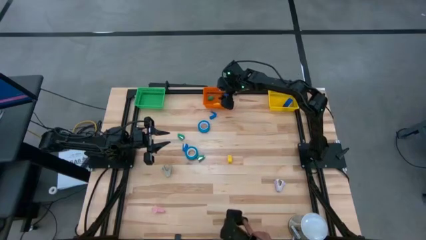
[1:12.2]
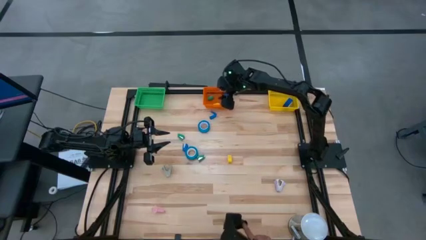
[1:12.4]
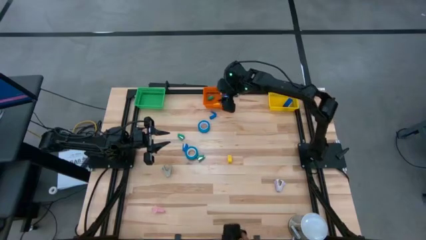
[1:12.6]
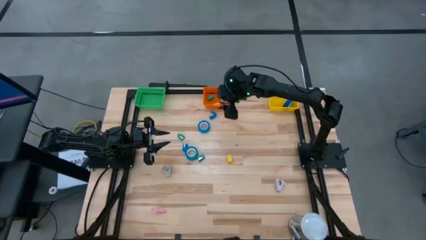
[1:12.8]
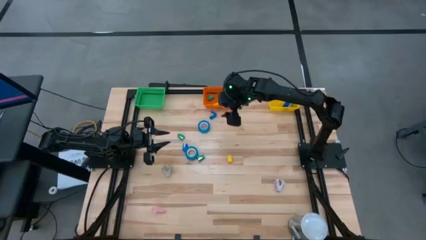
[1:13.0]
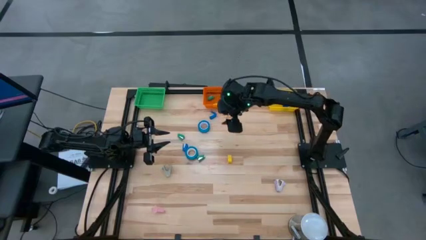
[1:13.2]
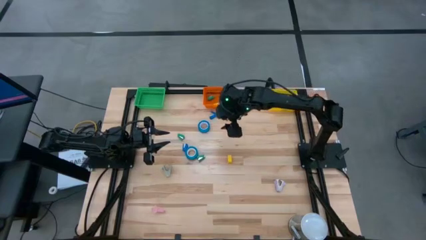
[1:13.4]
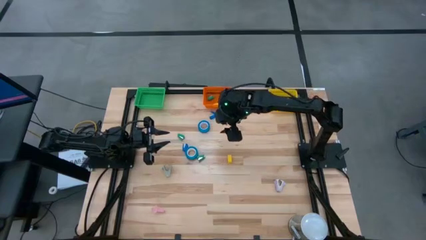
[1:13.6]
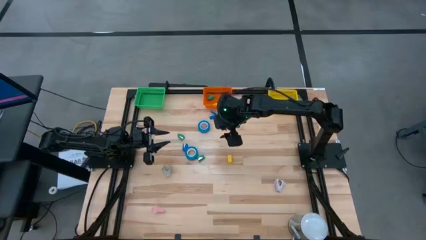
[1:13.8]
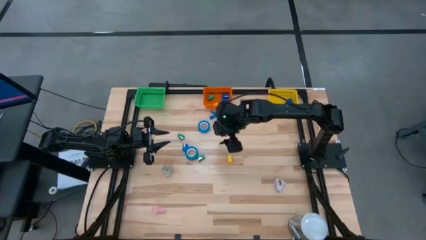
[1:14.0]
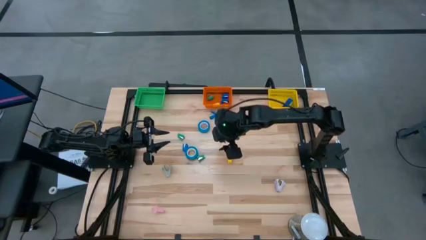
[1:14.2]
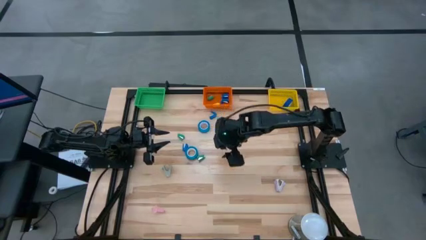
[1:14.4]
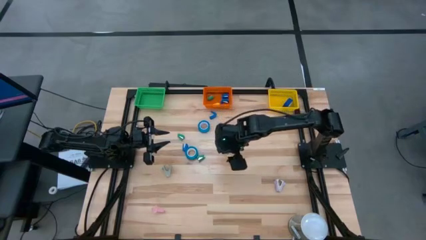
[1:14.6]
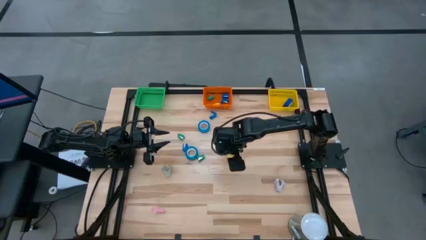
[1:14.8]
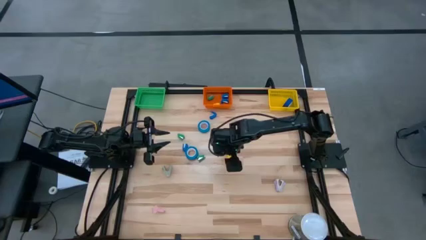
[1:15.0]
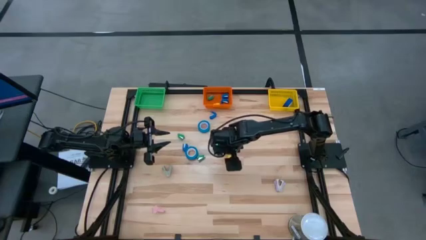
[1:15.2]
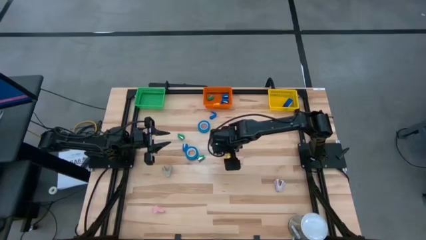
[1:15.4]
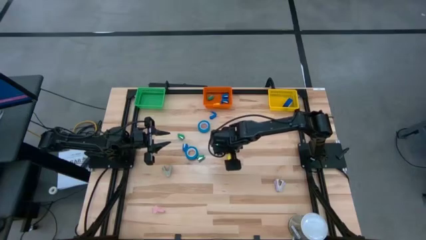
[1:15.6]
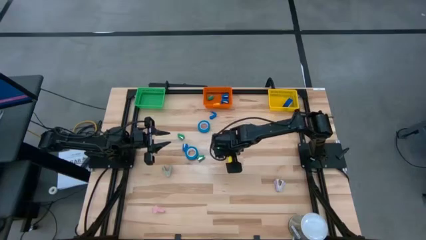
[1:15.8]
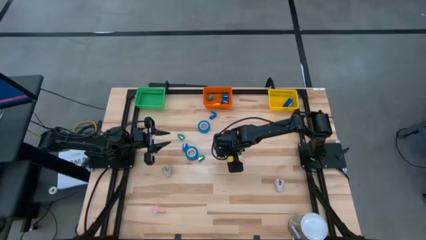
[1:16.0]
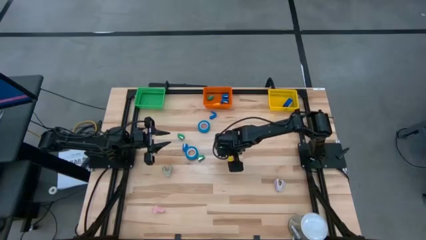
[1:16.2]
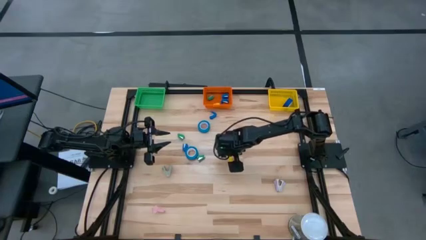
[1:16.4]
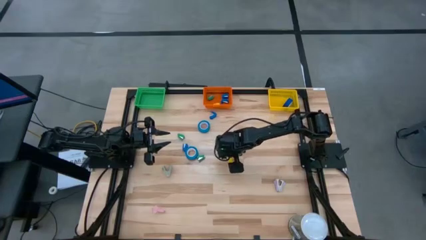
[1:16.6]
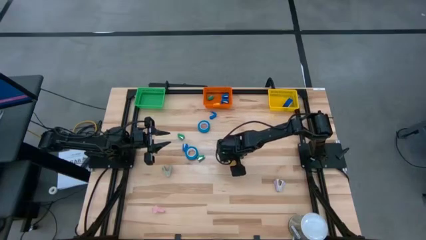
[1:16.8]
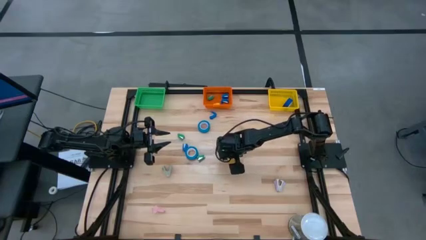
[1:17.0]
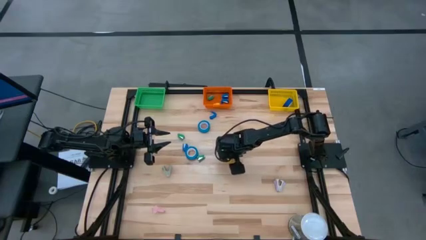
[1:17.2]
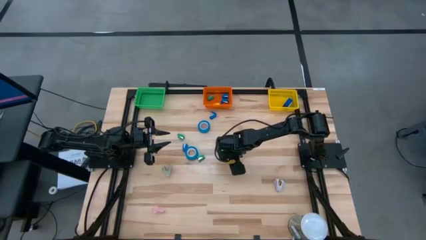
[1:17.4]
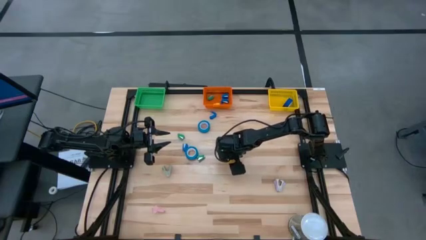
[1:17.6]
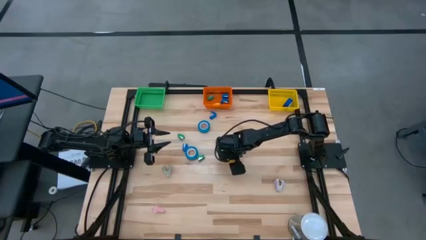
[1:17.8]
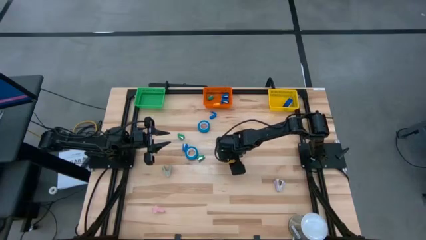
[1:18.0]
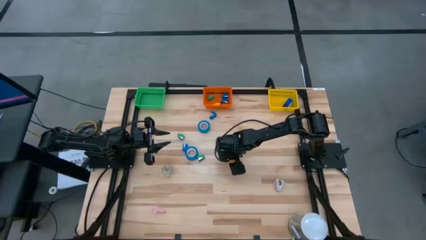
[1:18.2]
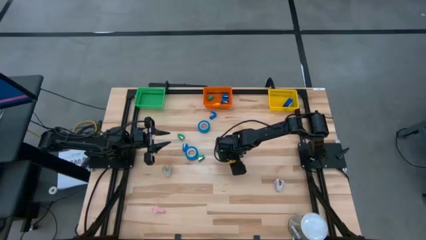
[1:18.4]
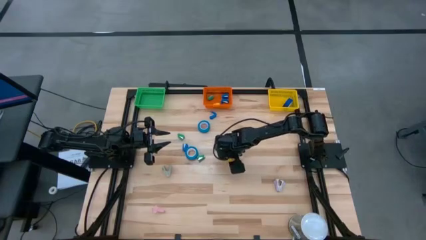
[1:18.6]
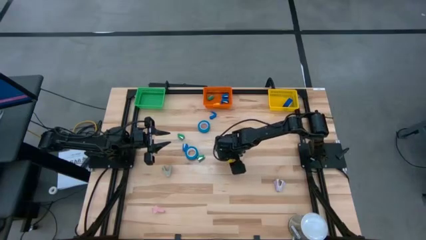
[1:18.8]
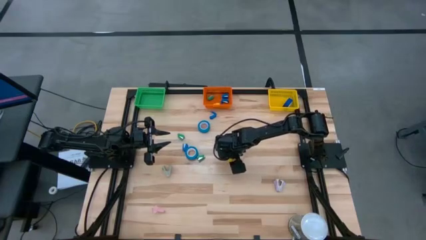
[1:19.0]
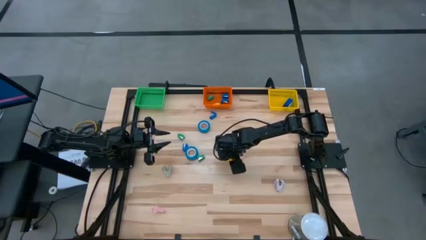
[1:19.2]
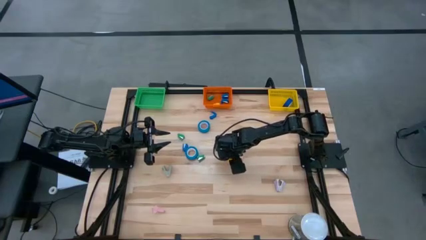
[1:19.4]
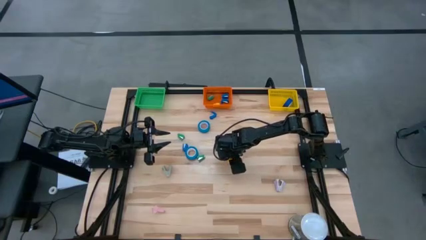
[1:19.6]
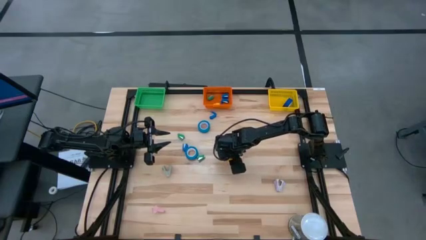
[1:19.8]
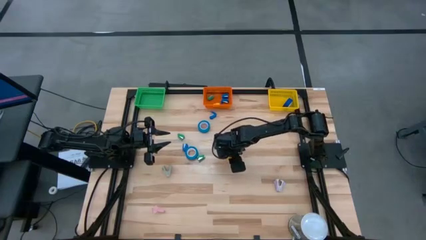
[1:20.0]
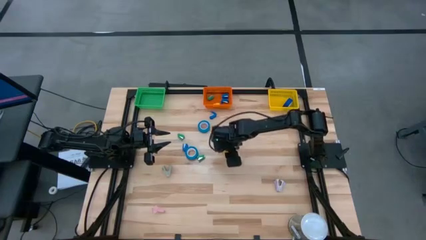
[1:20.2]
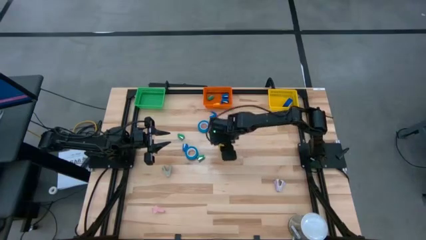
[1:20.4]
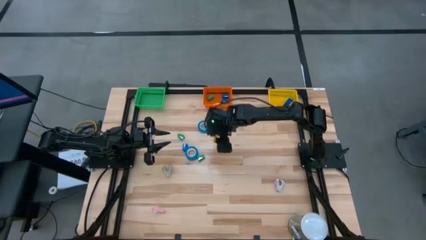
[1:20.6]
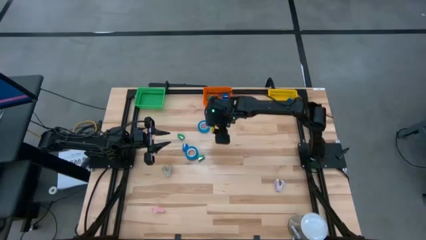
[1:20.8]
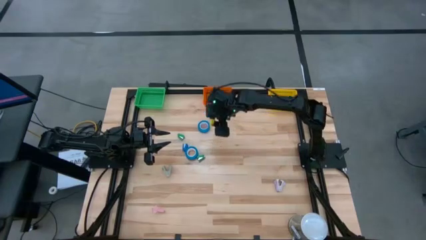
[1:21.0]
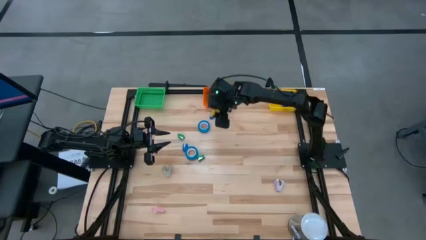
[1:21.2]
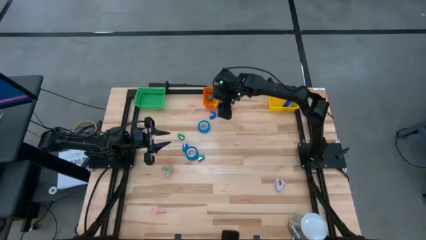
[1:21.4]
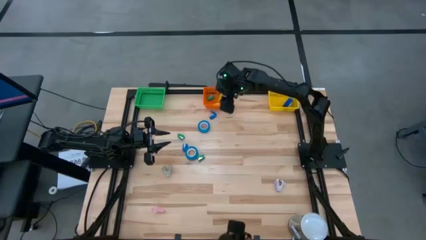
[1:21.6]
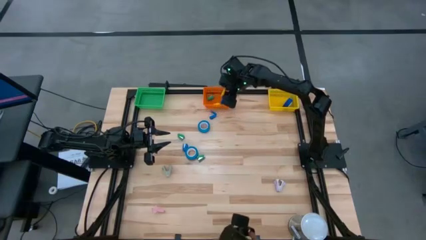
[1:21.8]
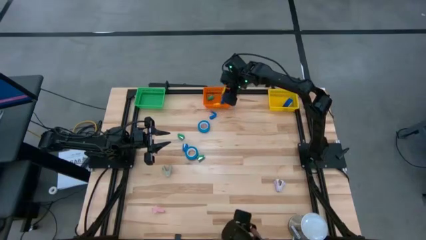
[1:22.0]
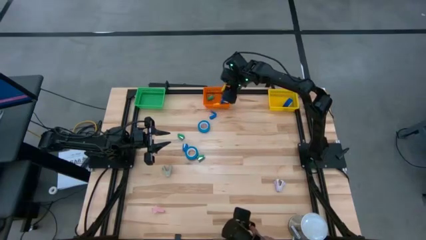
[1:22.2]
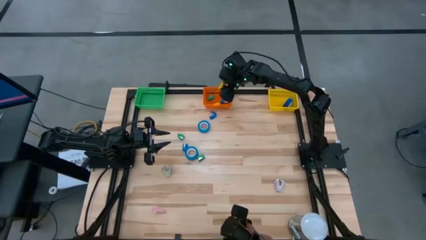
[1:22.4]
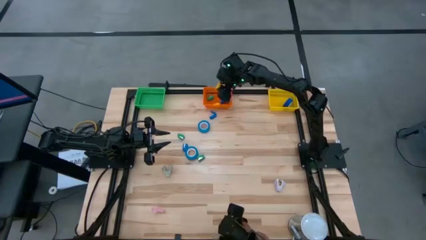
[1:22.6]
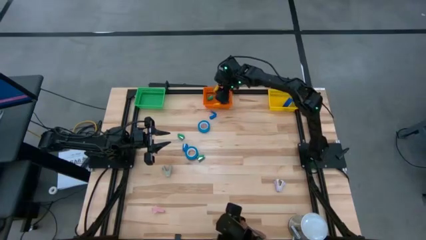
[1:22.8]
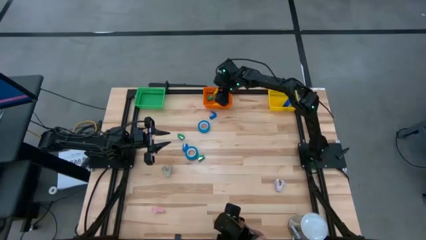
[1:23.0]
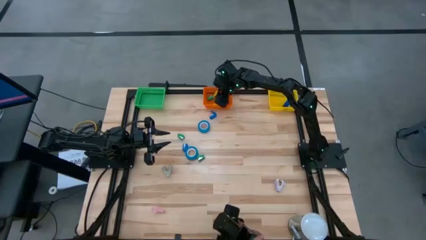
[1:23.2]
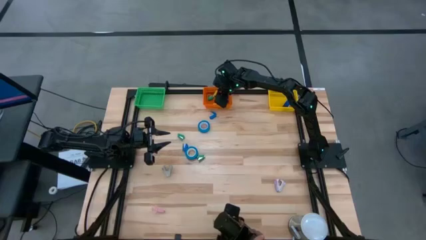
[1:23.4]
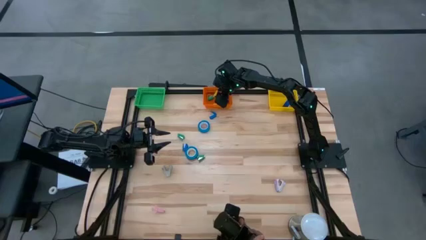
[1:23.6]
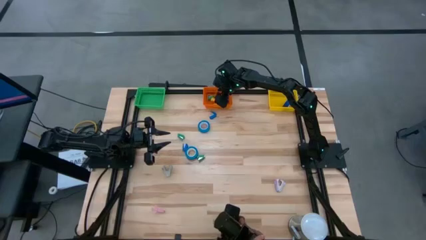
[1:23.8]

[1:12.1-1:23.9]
Task: Pick and place Stapler, Stapler remover, tape
Put the yellow stapler into the orange bin

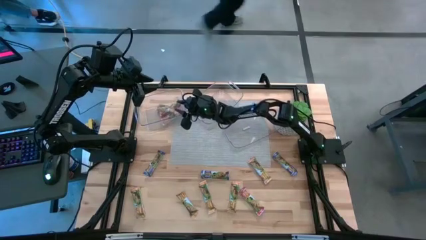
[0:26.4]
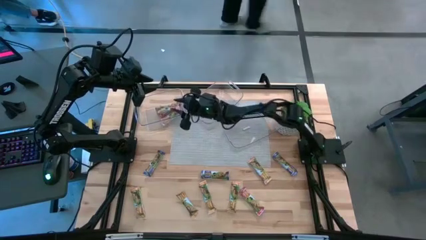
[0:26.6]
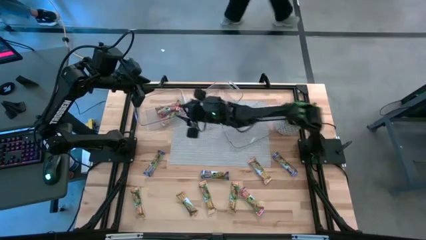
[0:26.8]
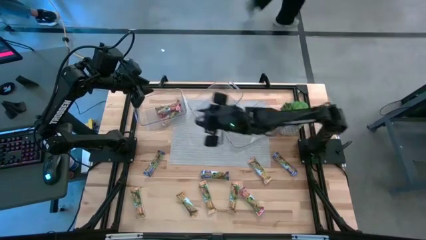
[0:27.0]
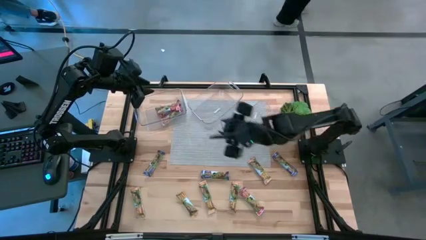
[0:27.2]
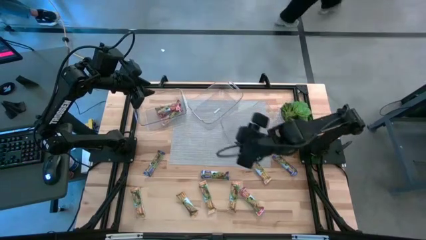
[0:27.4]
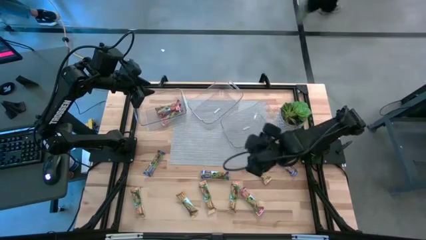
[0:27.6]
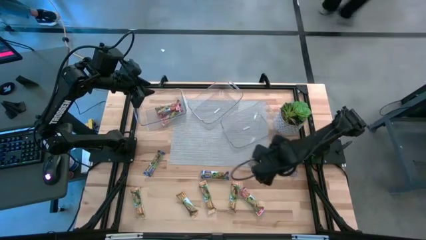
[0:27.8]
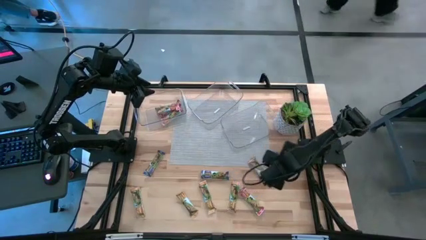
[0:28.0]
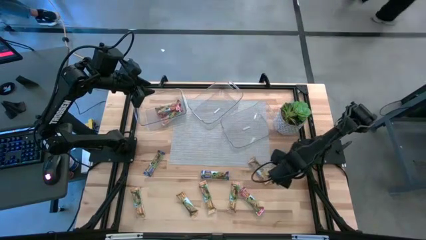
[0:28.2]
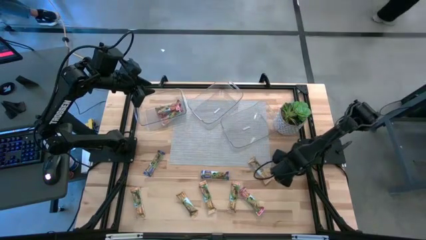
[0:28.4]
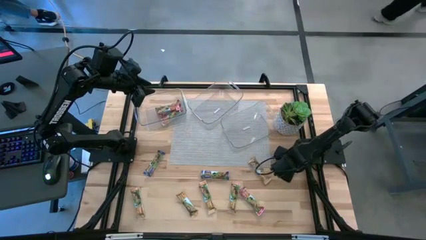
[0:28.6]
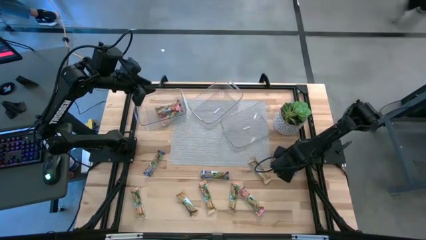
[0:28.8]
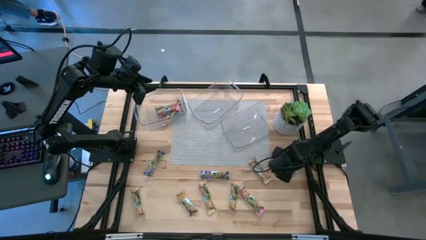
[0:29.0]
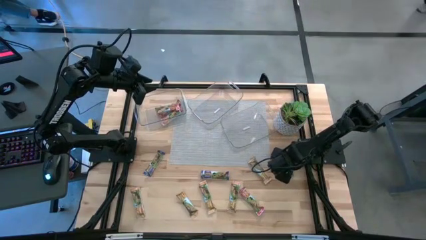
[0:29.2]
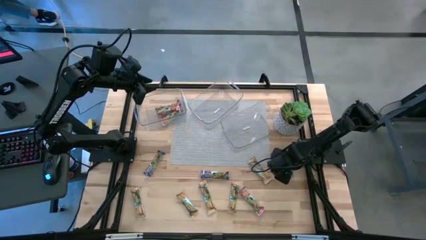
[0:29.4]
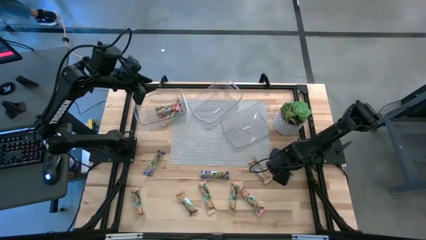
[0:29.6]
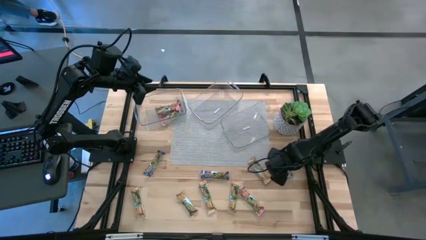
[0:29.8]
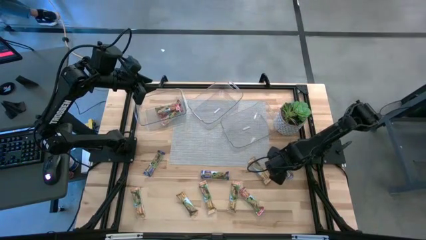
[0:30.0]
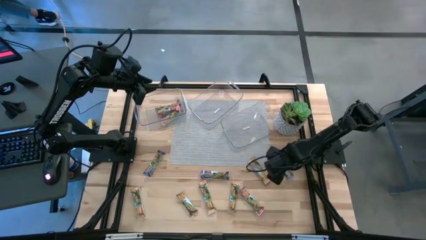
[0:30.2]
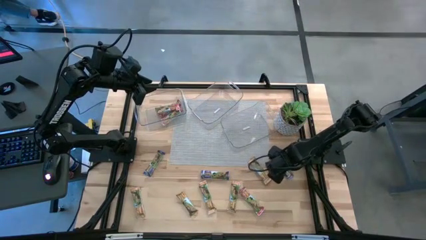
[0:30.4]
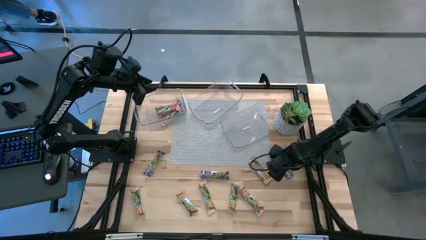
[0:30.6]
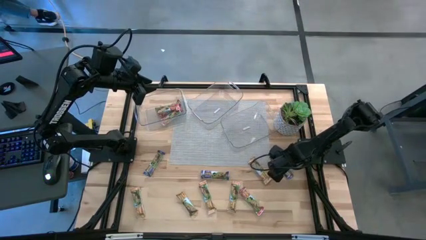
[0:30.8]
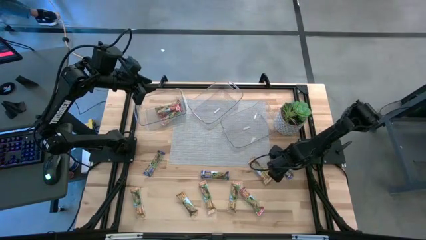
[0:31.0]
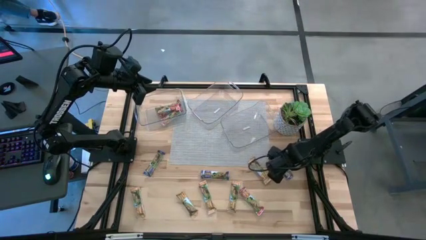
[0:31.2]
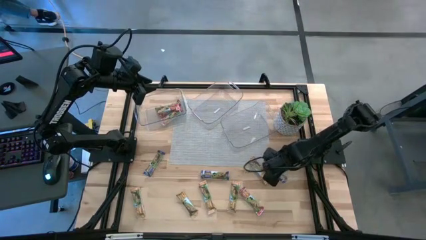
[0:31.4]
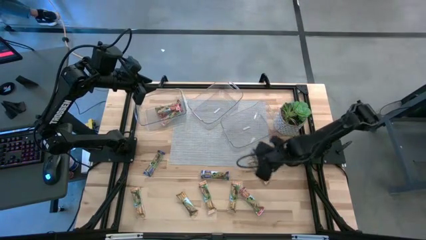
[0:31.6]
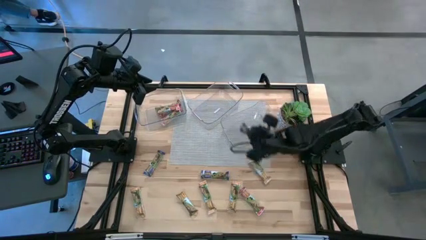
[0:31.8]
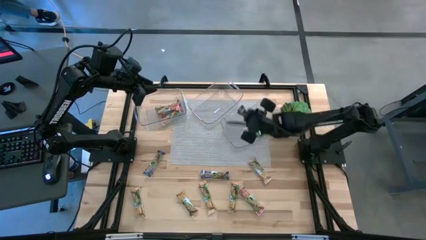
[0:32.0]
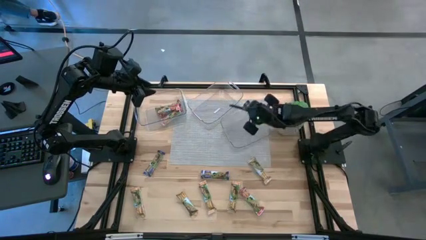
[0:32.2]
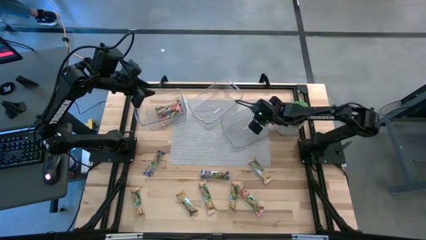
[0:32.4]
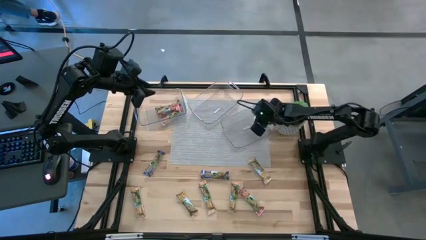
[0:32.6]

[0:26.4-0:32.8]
Task: Pick and place Granola Bars by type
Put the blue granola bar into the right transparent bin
